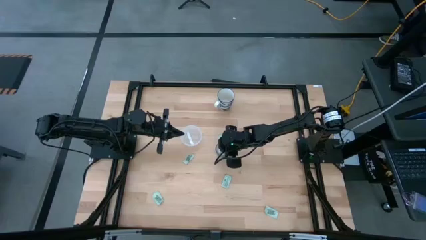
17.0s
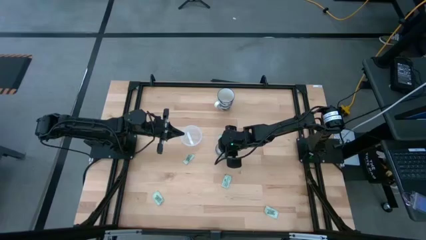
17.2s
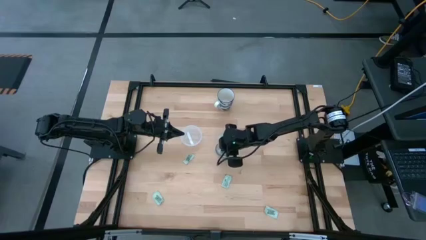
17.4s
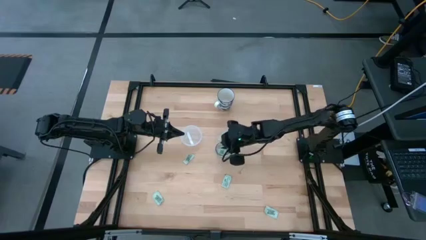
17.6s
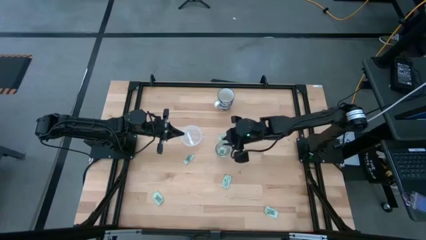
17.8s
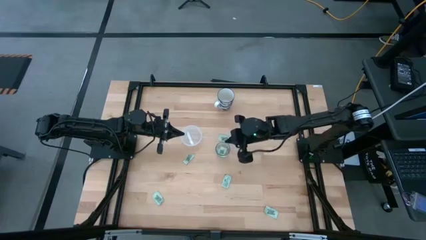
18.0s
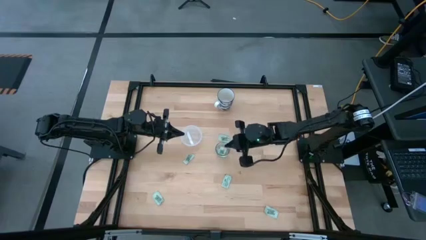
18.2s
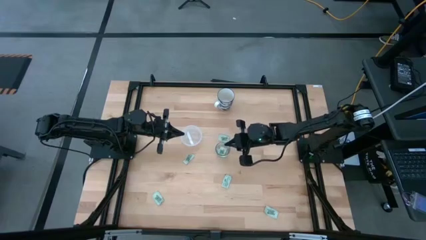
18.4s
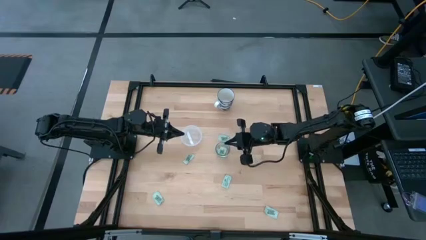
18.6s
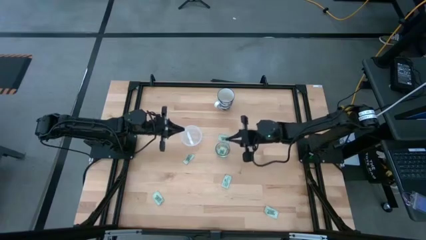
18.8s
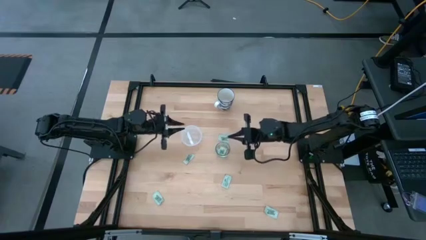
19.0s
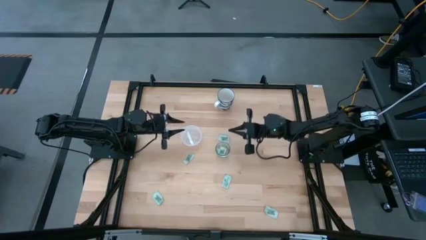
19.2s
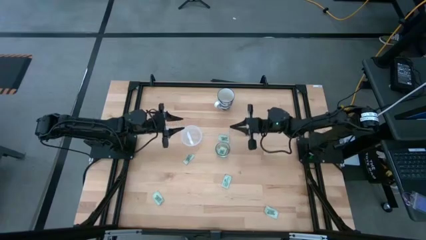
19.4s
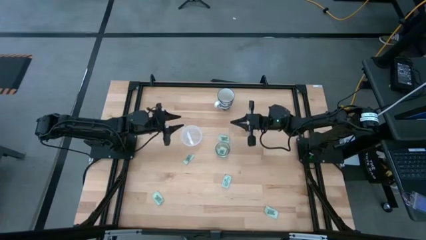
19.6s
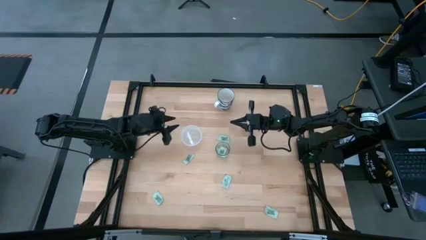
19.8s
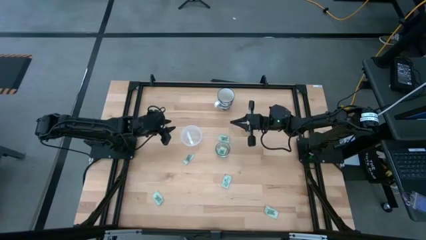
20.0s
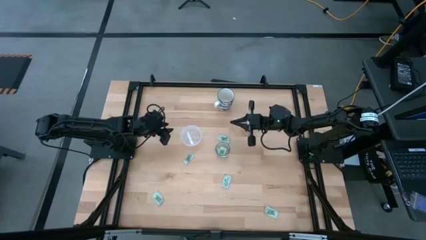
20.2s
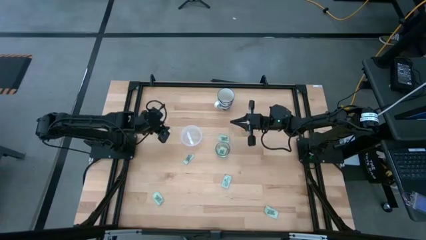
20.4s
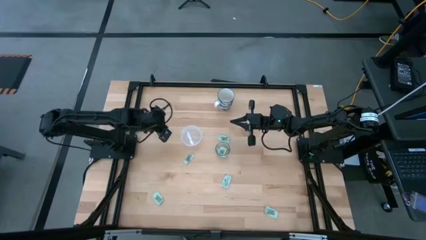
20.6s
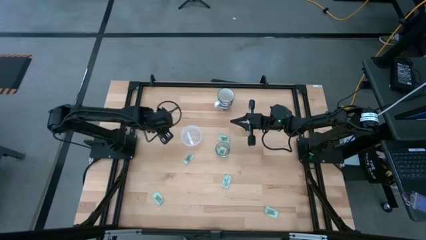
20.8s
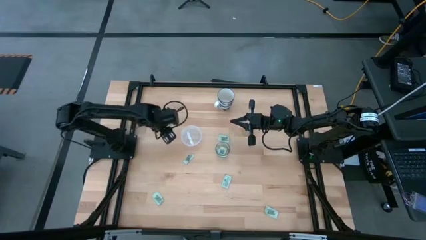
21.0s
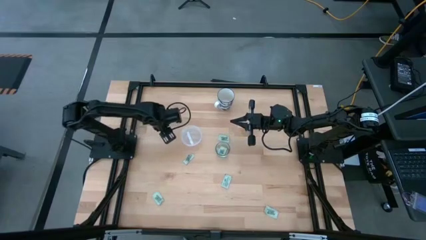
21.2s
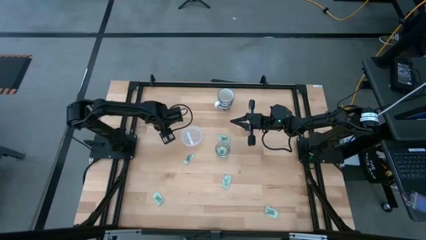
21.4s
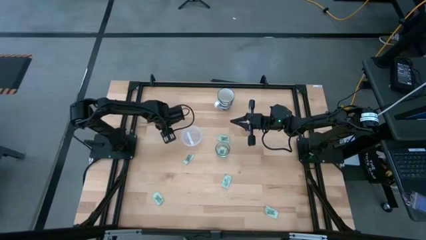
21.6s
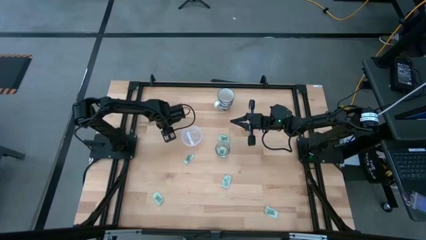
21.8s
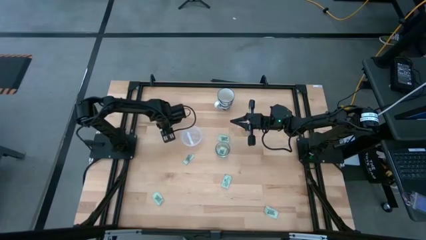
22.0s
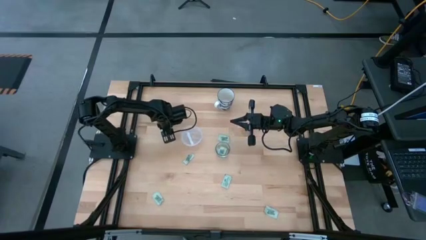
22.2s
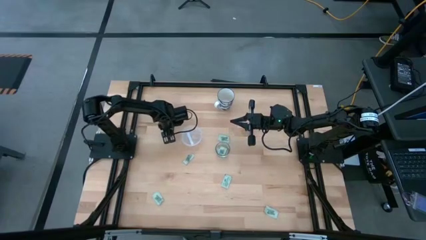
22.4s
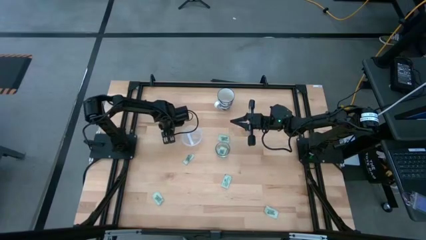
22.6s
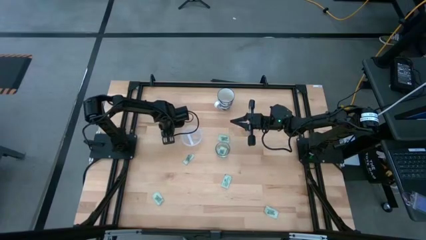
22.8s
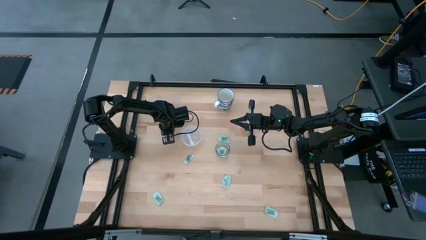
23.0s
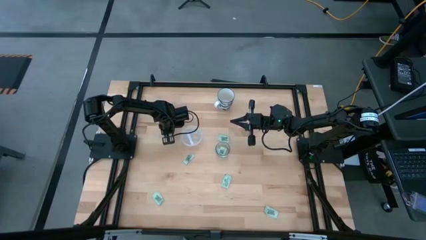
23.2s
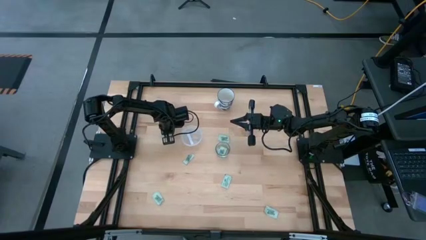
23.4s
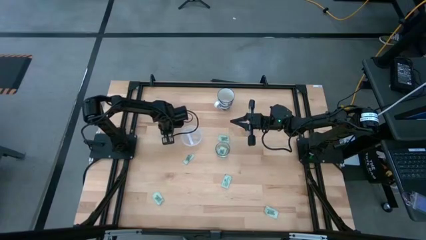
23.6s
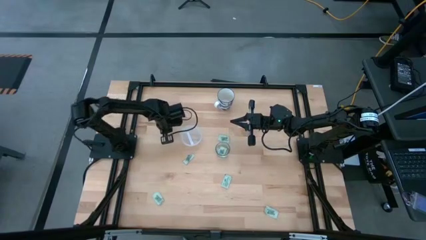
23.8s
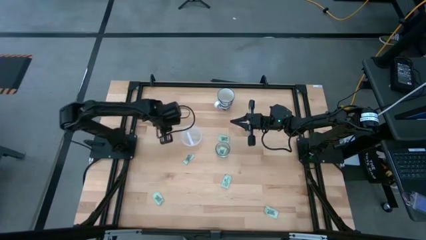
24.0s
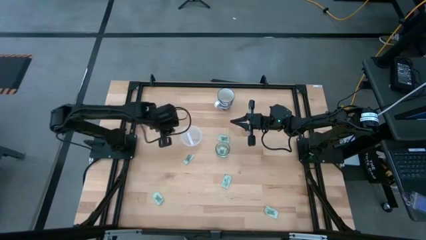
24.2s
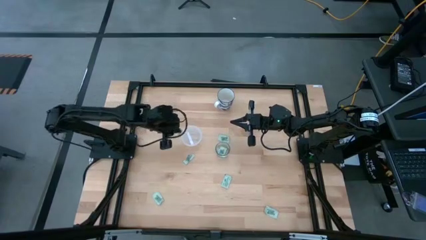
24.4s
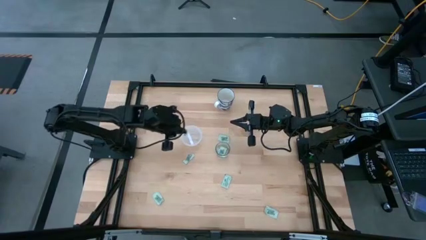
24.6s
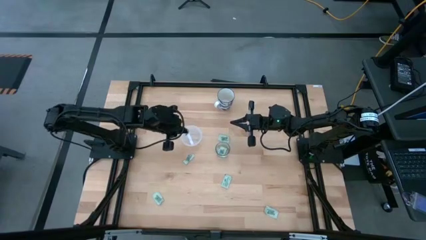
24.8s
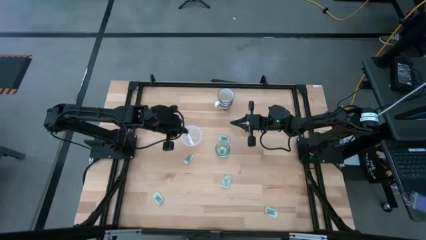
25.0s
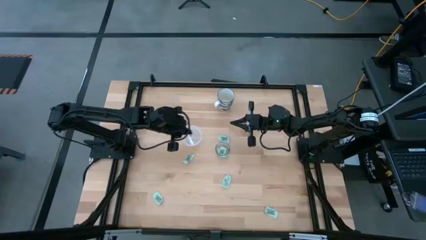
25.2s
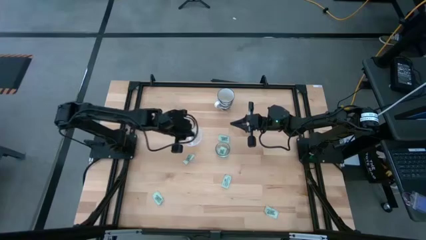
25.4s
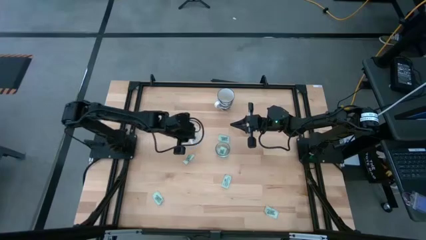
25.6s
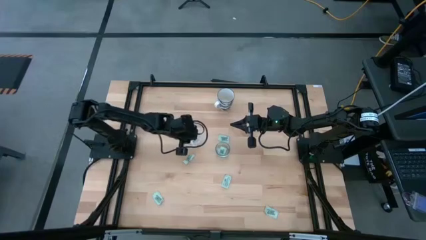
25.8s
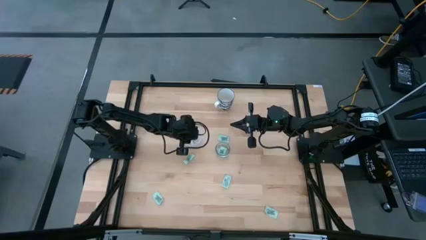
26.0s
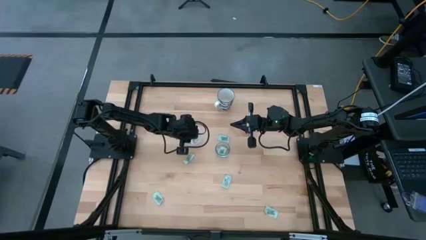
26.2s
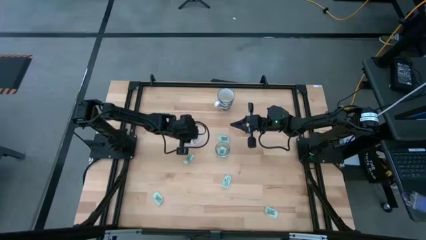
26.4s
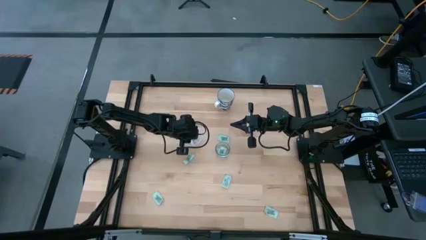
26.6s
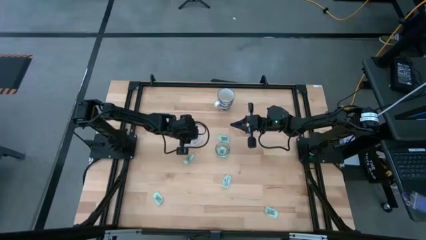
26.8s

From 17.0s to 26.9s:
Task: Pick and place Stevia / Truvia into bins
Put the stevia packet into the plastic container

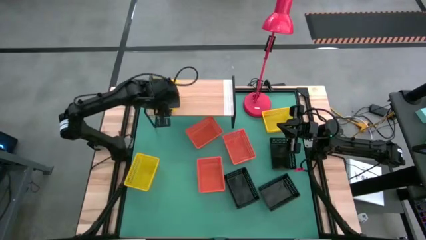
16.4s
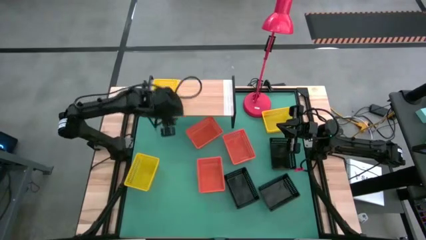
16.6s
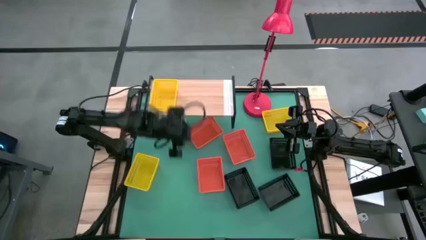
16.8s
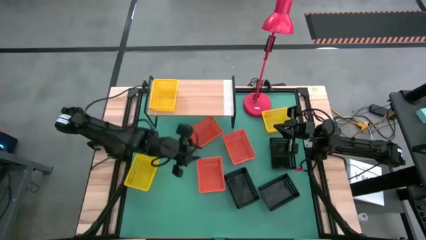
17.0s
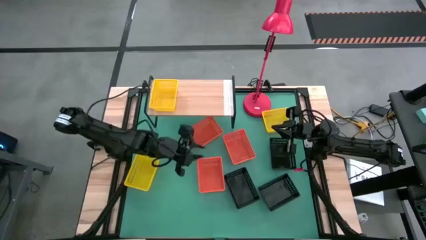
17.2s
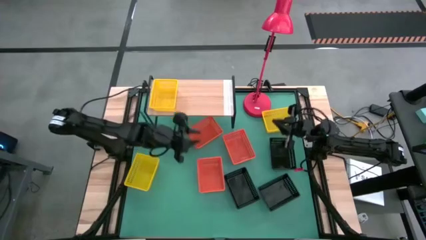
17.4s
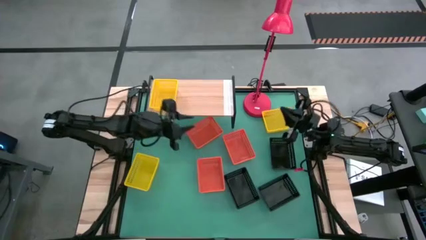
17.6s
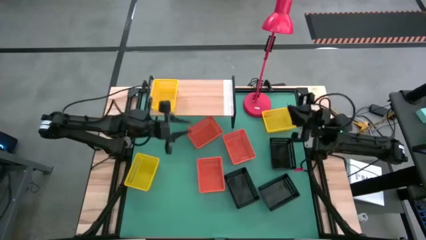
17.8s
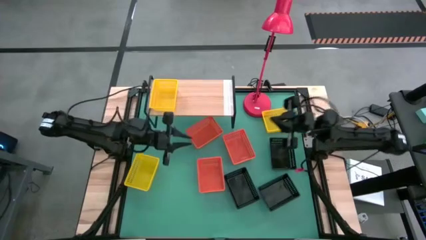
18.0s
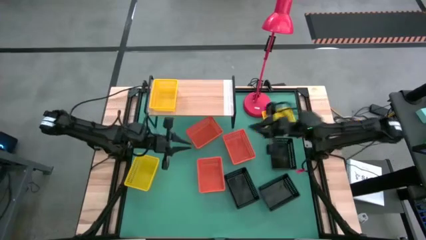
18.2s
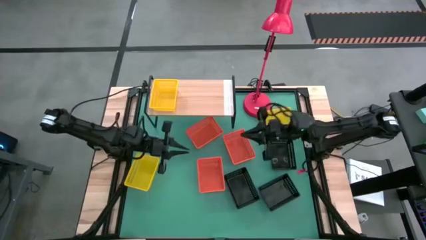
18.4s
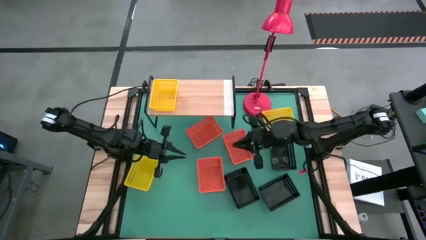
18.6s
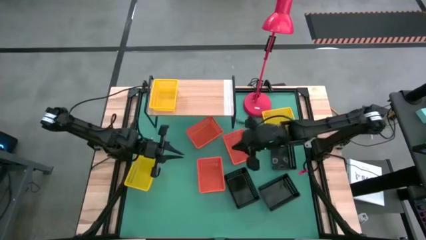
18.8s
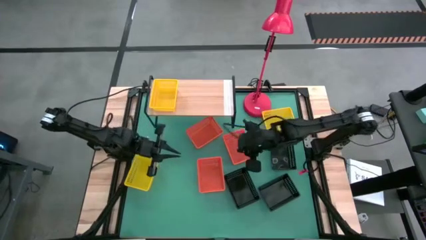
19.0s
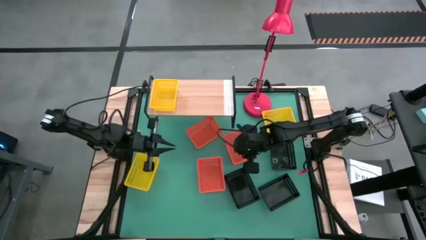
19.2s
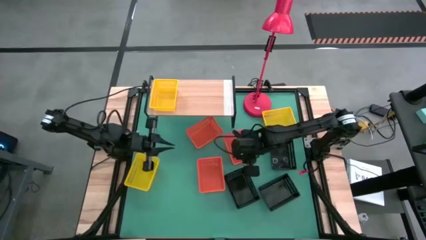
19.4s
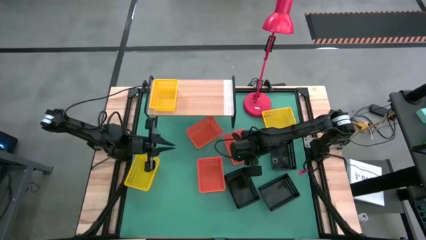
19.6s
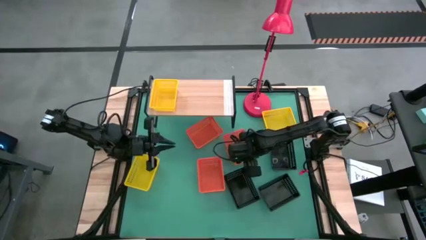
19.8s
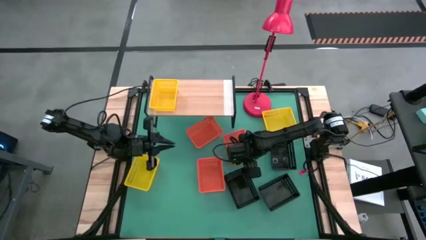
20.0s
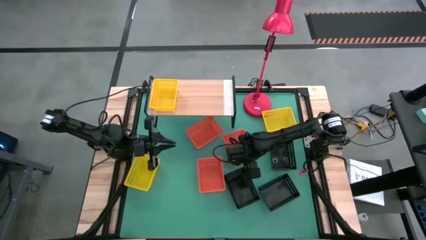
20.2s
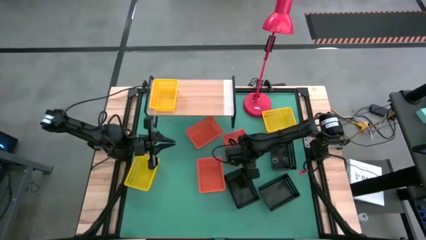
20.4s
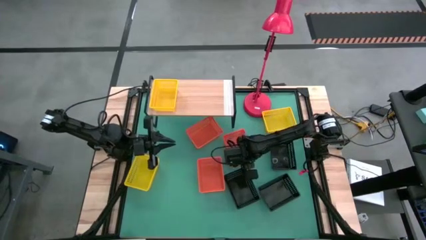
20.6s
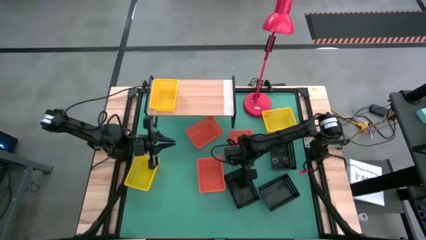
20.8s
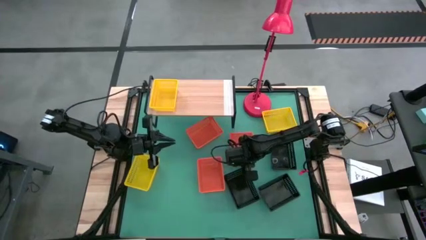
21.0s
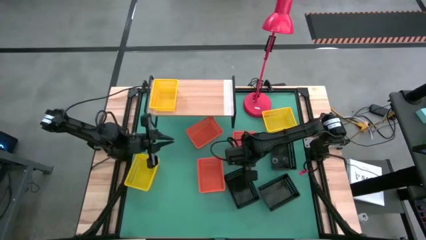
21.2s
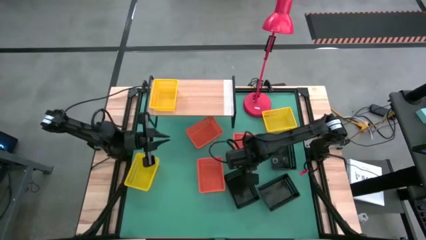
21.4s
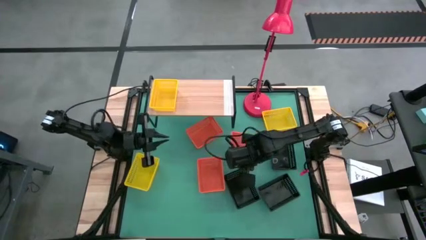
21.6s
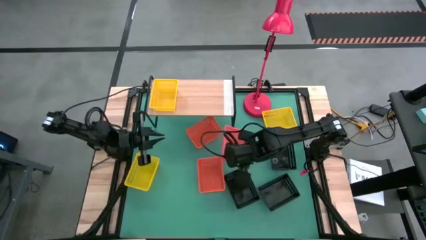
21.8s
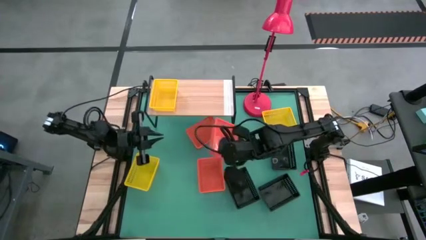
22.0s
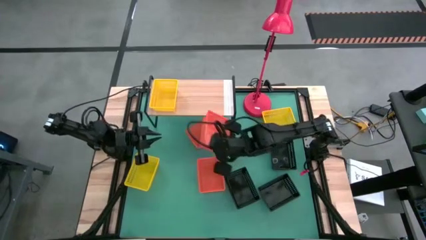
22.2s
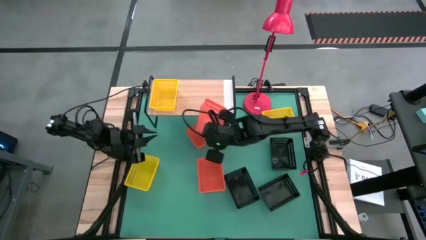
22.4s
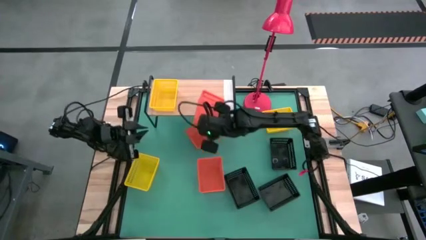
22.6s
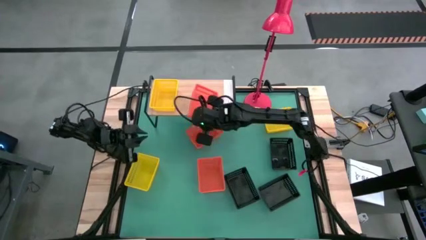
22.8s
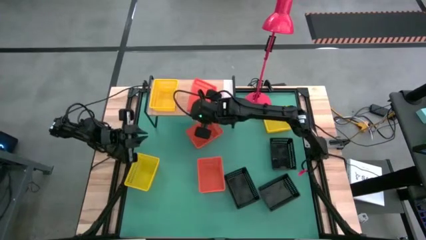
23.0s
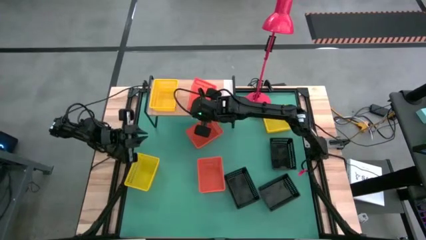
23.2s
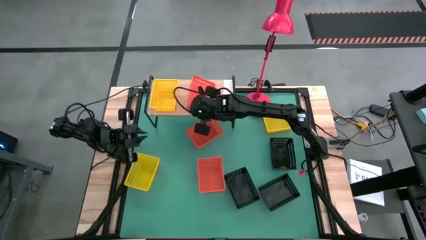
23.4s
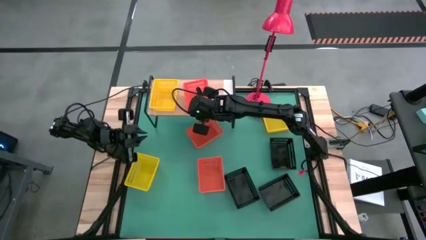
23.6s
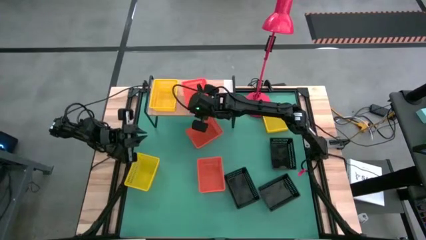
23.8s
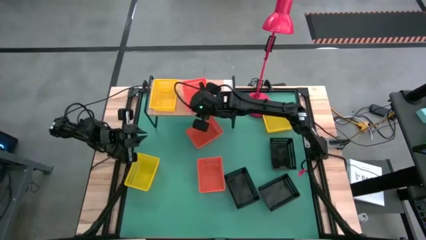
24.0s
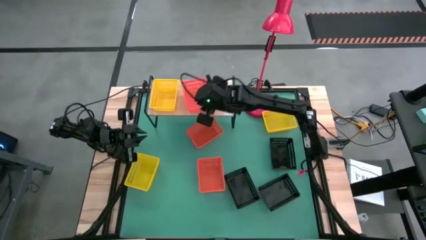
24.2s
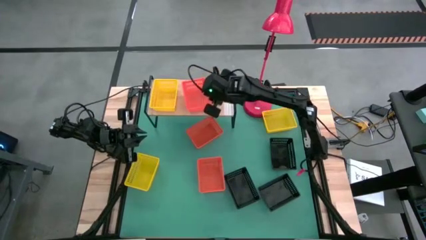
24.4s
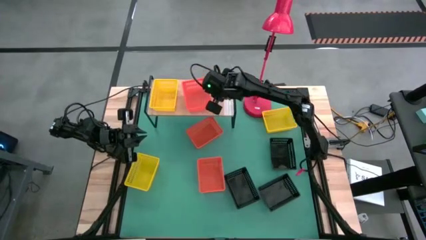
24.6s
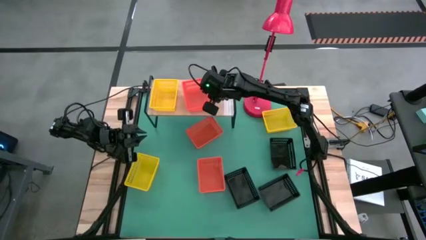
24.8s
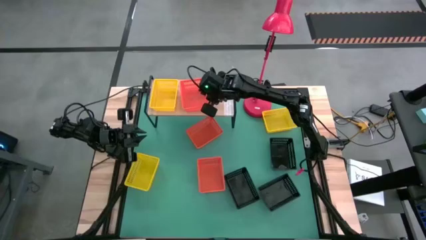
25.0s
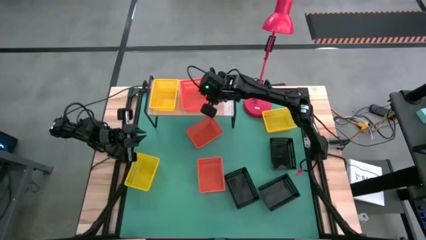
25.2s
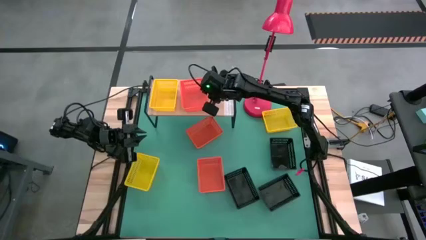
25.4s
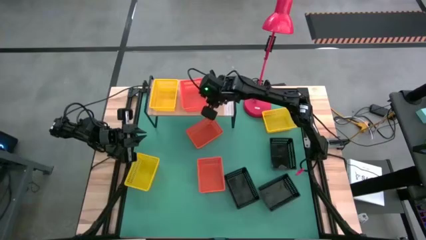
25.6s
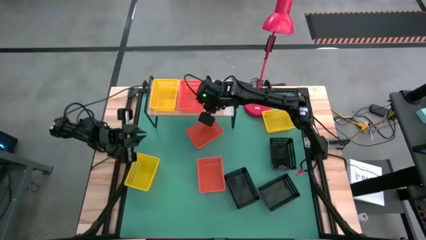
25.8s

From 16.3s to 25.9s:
Task: Stack baskets on shelf by color
Put the right orange bin on the shelf
